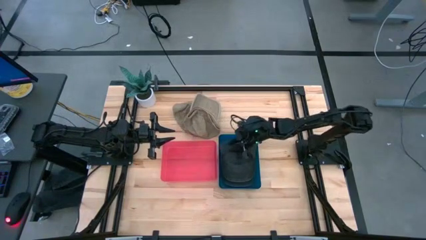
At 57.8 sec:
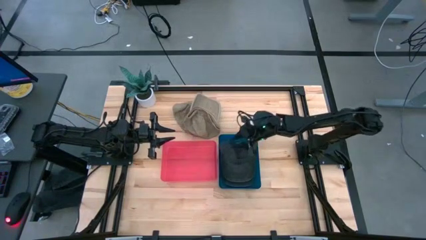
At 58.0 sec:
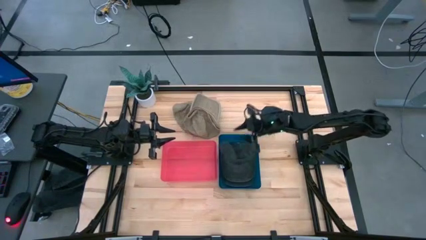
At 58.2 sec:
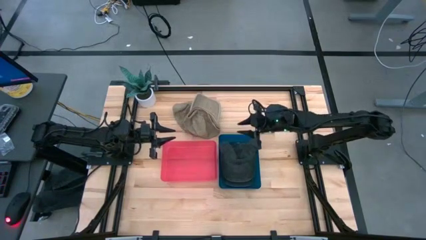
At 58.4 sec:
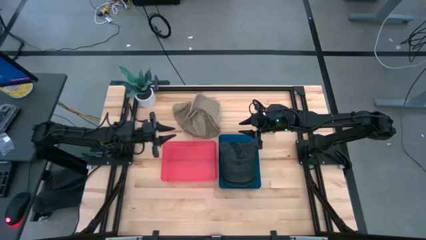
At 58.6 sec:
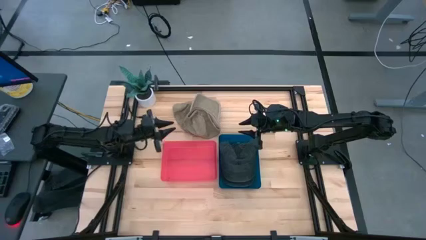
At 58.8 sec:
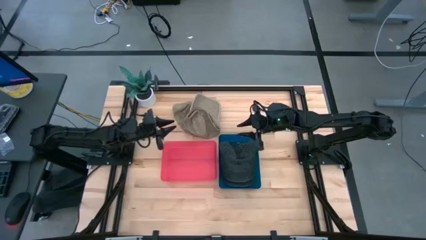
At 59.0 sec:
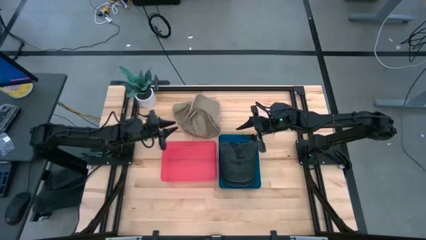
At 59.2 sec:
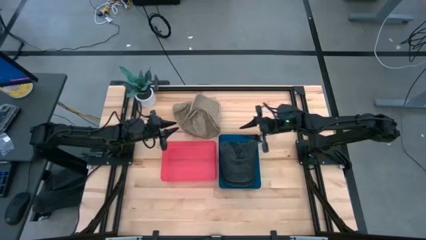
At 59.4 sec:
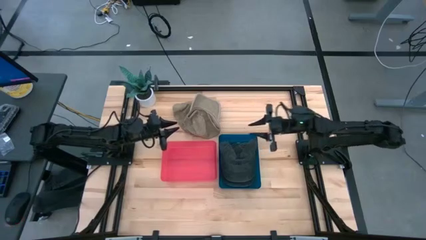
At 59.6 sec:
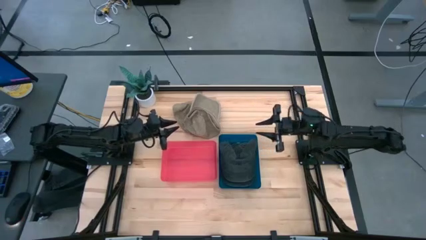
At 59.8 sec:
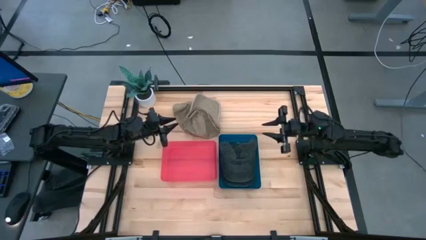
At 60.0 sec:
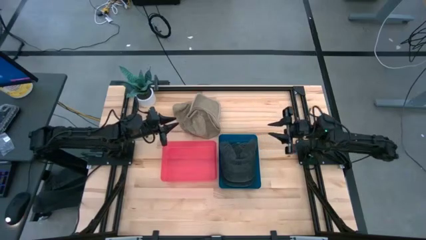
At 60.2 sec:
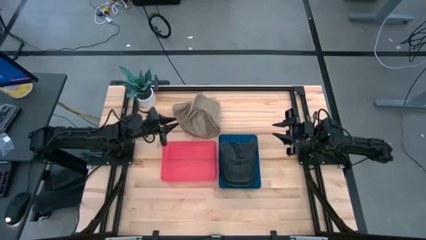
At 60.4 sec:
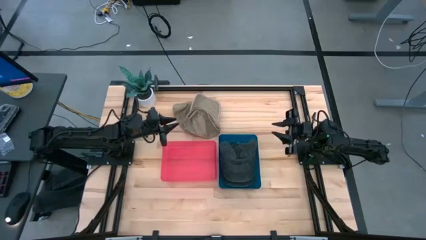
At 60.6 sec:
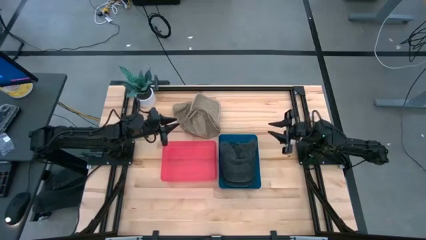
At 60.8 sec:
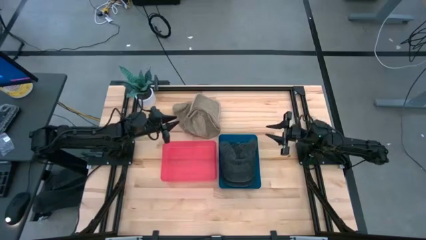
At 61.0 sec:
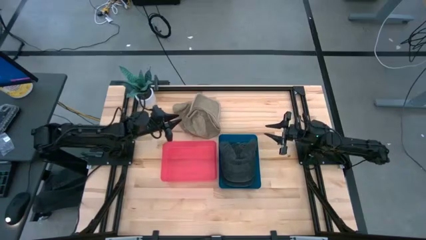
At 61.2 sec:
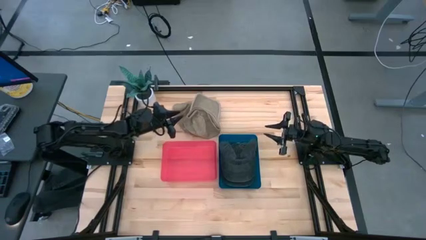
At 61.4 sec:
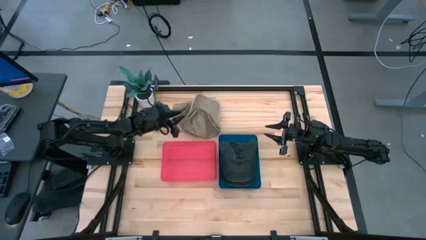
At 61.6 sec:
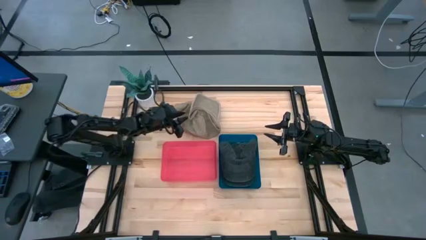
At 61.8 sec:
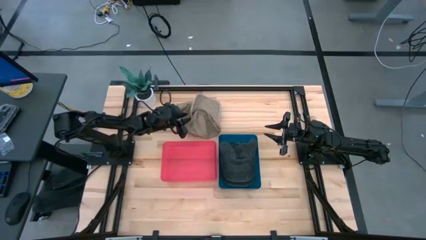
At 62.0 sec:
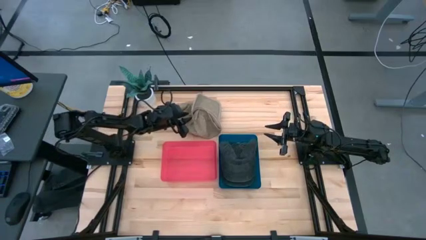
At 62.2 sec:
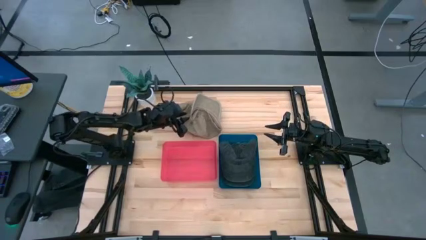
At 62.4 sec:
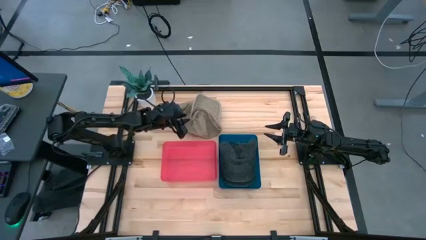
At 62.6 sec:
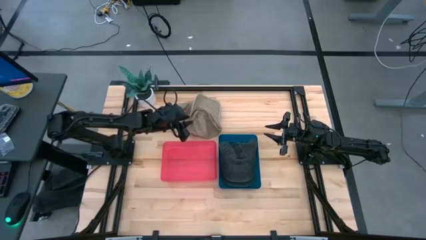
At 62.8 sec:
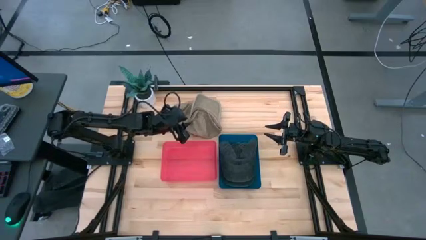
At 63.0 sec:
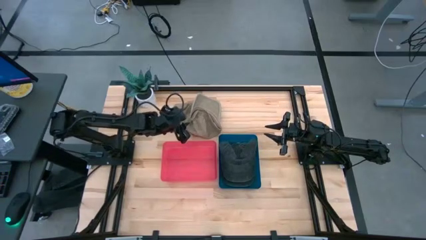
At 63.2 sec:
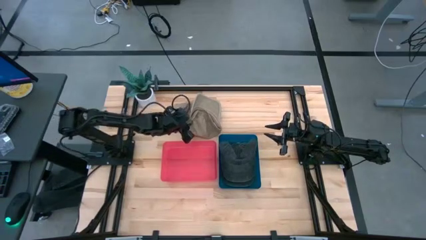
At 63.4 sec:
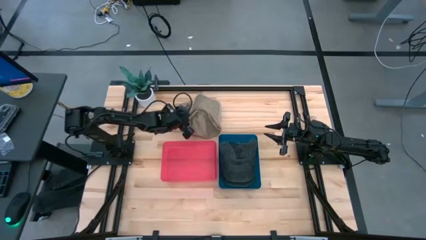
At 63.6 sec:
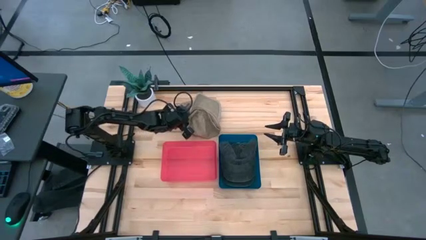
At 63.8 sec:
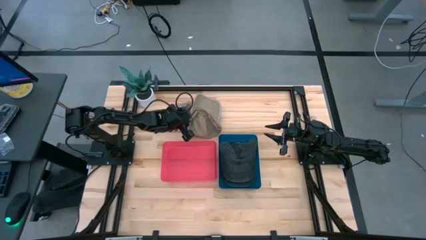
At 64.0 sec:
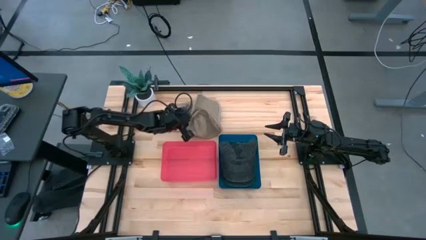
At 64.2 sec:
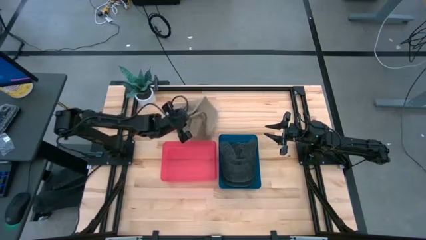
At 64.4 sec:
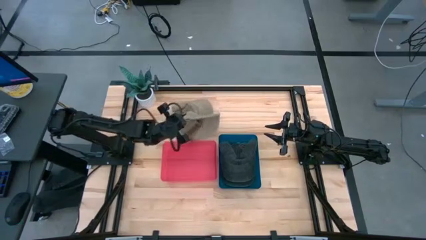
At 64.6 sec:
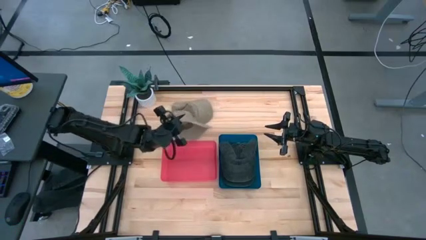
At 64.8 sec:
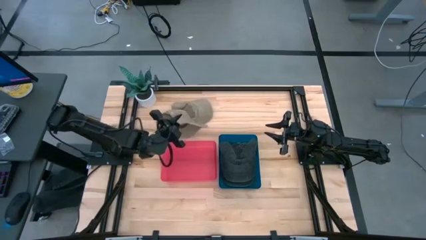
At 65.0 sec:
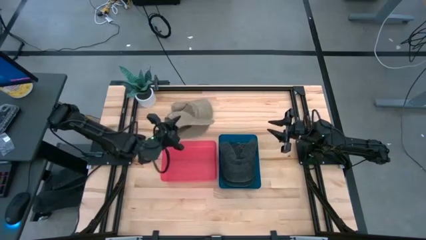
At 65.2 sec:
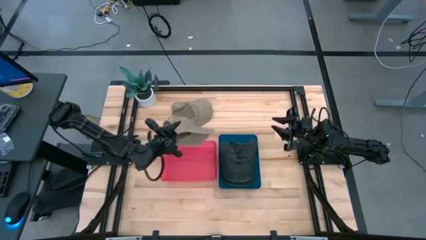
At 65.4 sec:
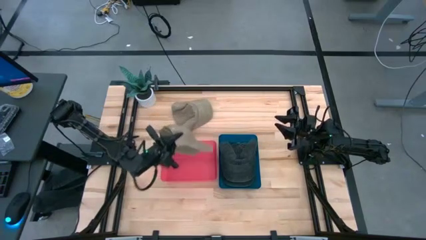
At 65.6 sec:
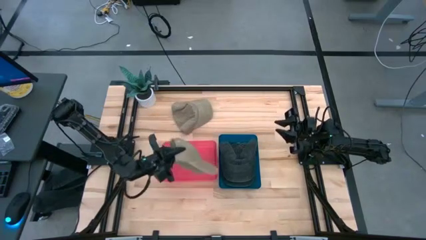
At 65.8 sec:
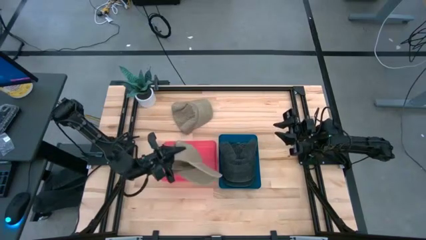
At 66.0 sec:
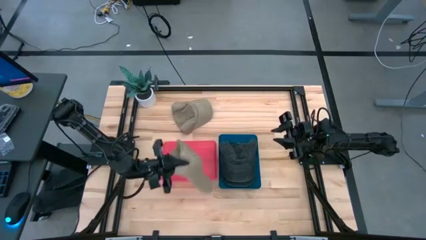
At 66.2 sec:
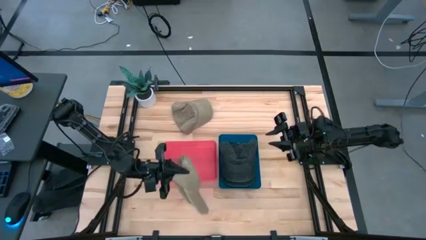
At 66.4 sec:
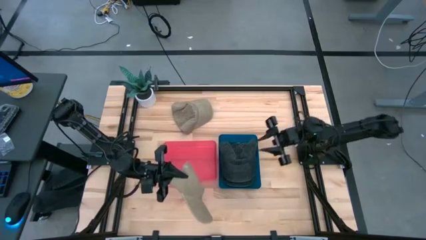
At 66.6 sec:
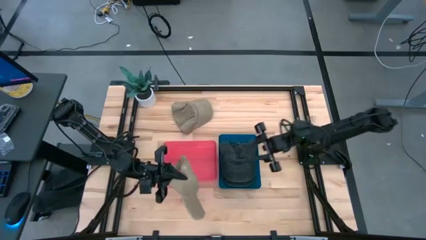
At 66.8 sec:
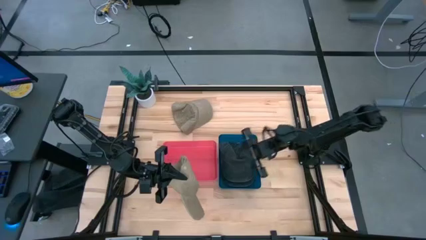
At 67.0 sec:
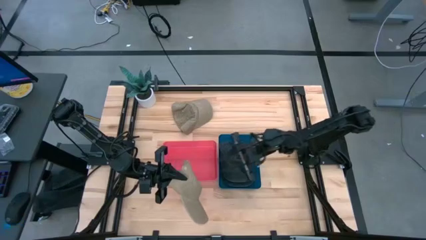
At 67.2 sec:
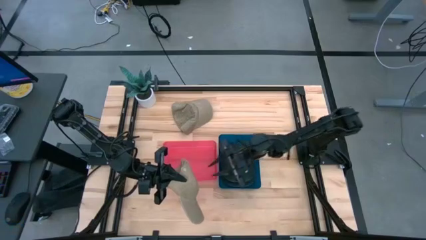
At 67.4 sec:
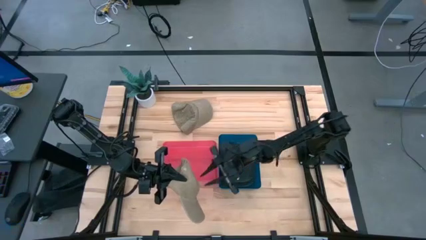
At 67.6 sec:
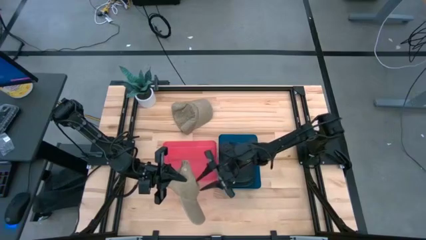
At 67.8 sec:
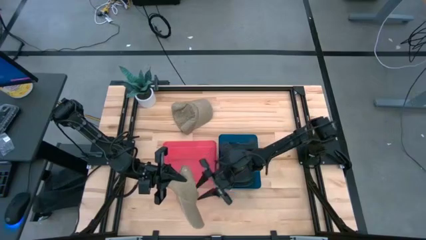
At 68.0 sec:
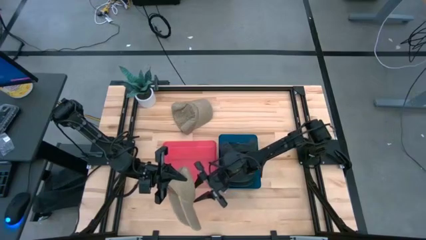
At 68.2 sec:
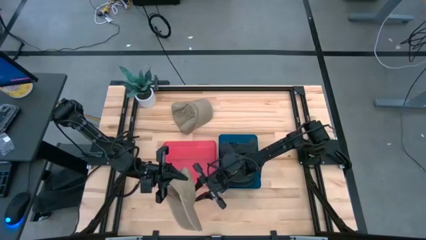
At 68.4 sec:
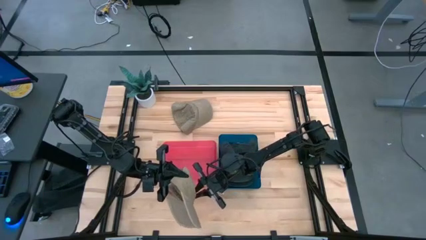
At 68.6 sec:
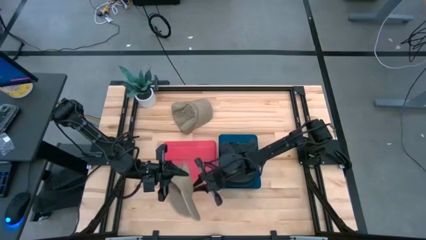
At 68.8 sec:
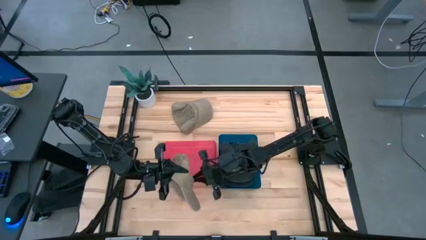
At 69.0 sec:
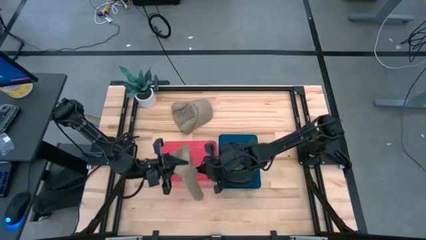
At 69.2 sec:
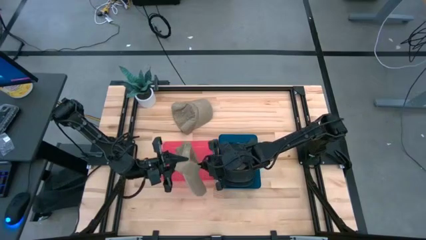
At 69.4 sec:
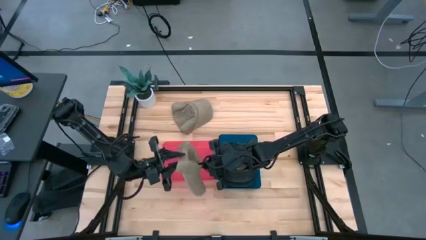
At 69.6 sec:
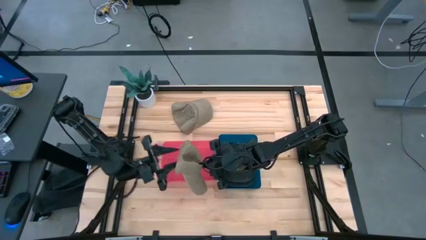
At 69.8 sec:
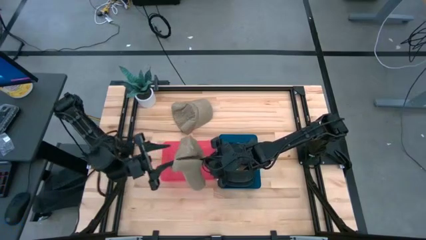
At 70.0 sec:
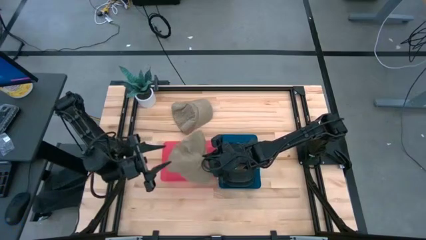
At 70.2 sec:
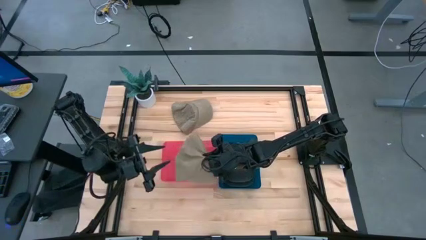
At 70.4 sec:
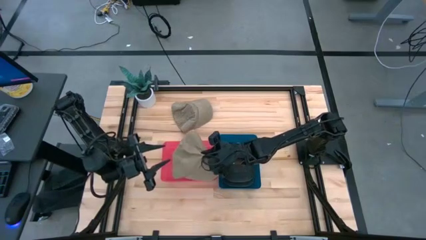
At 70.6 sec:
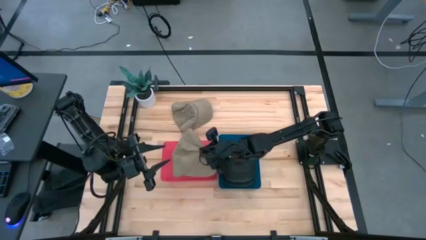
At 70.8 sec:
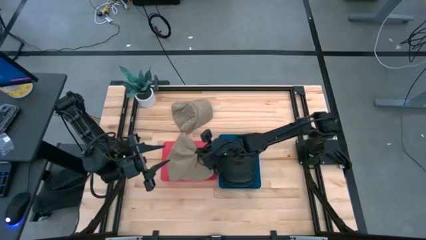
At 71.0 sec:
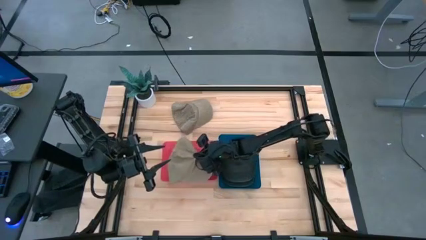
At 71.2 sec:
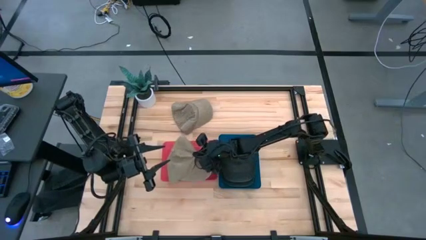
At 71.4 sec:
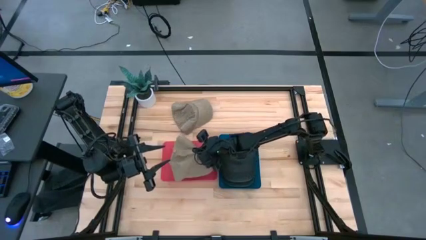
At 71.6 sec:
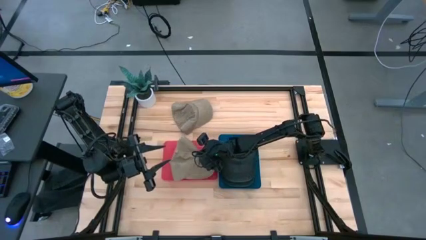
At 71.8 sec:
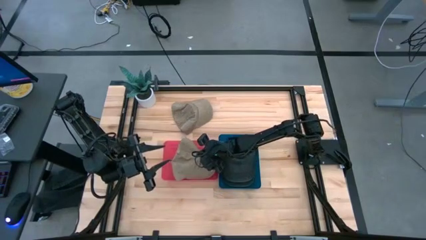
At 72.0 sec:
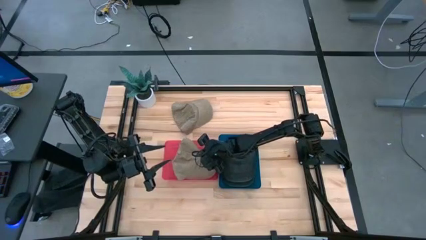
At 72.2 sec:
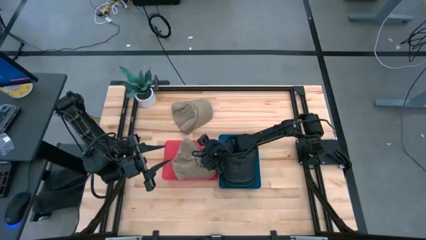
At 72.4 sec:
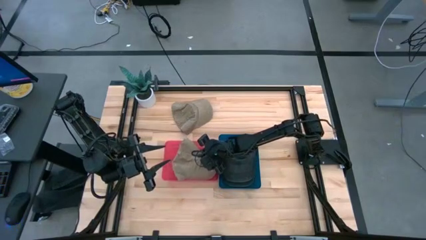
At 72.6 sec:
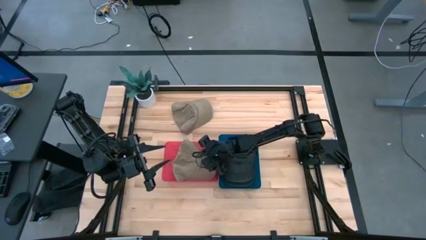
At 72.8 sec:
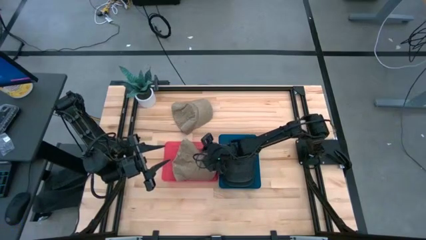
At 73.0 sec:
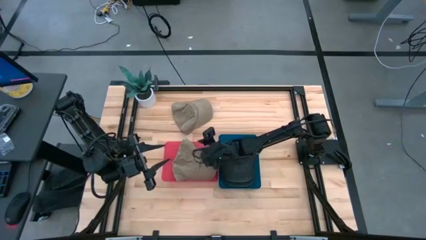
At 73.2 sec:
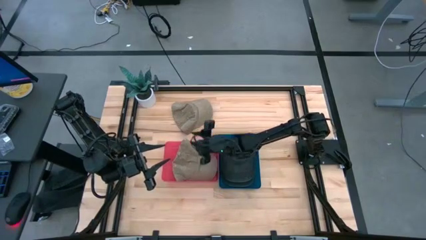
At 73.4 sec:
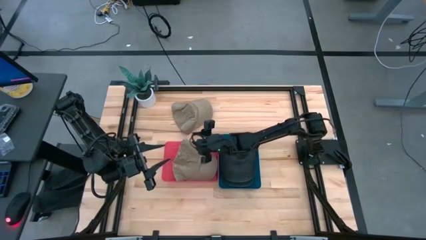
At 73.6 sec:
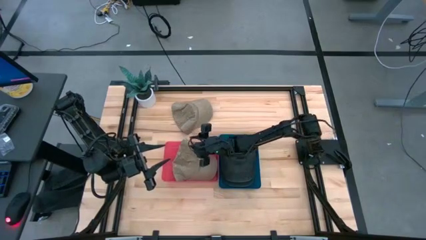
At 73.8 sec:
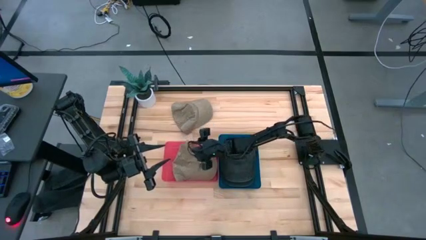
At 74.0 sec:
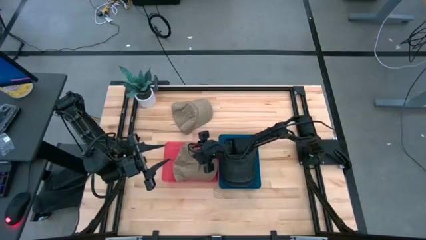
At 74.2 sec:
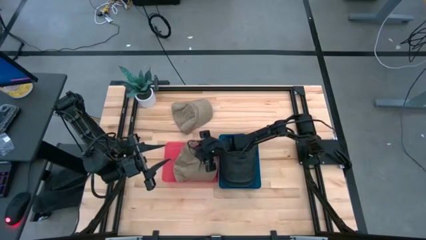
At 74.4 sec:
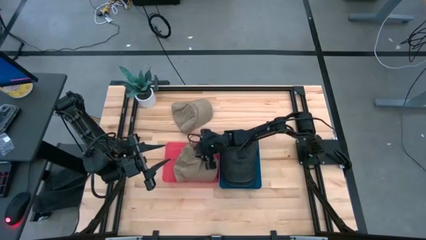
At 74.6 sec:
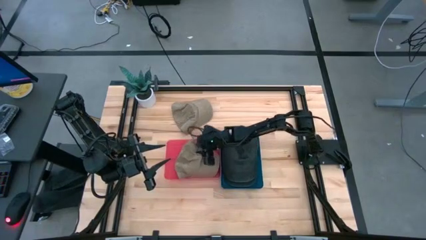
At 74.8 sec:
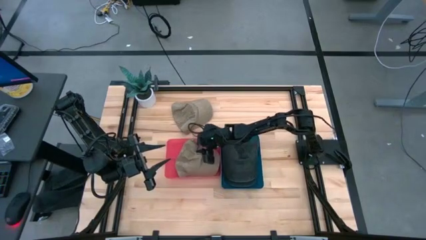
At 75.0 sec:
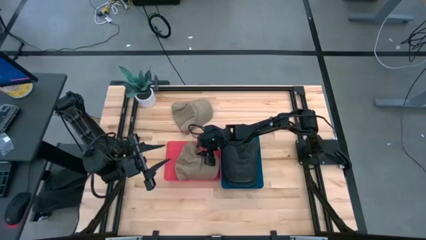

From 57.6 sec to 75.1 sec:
Task: Pick & Place hat
Put the top brown cap into the red bin
